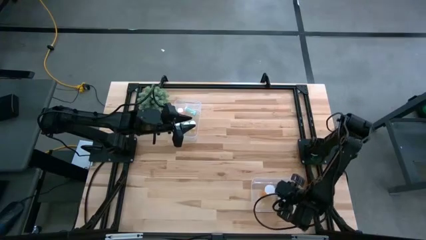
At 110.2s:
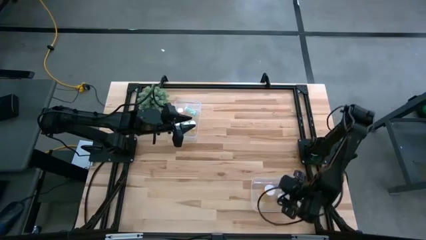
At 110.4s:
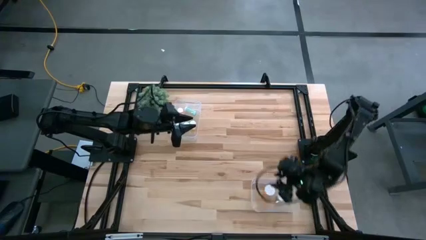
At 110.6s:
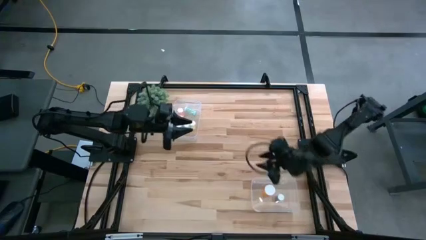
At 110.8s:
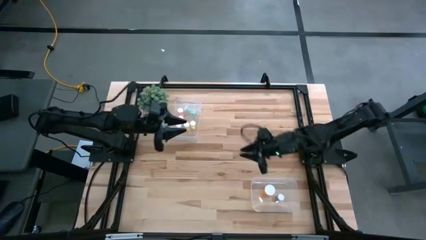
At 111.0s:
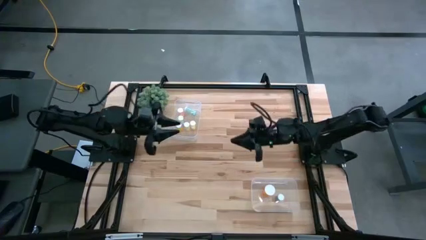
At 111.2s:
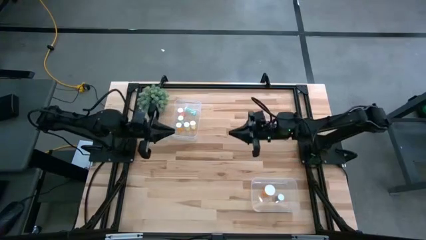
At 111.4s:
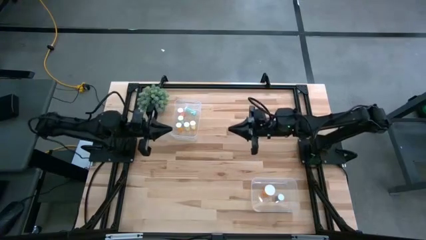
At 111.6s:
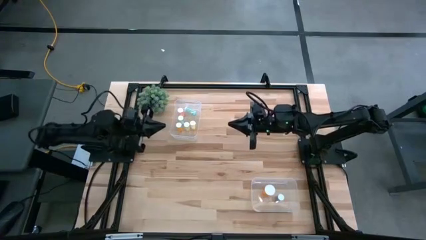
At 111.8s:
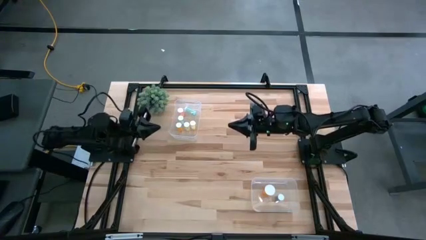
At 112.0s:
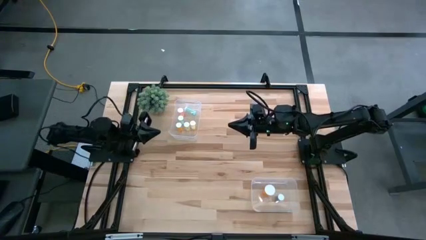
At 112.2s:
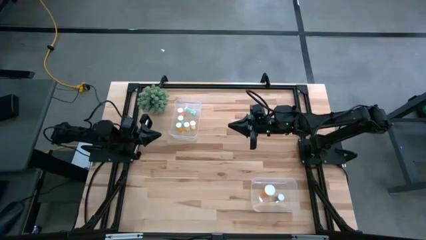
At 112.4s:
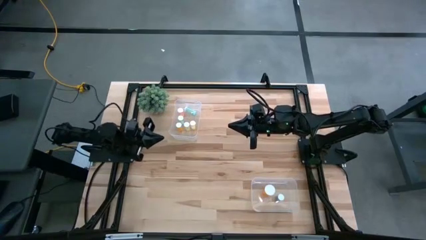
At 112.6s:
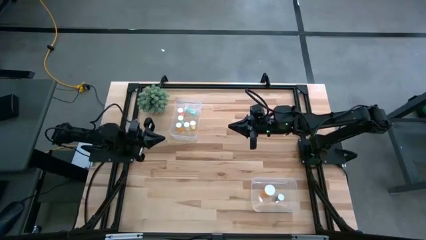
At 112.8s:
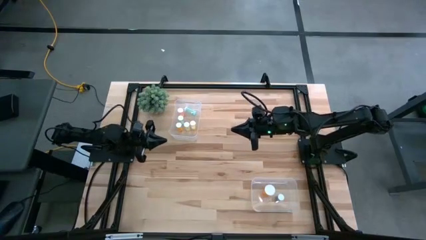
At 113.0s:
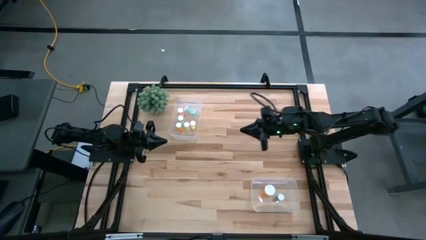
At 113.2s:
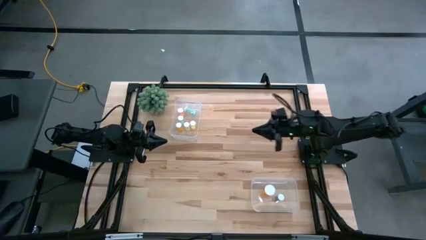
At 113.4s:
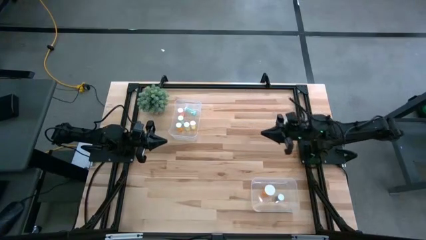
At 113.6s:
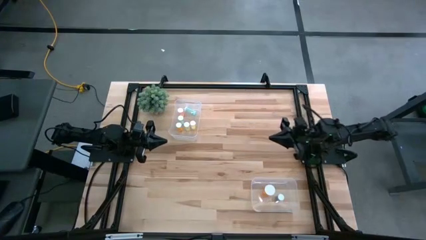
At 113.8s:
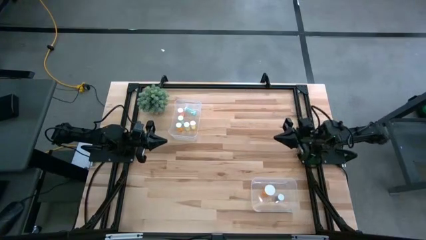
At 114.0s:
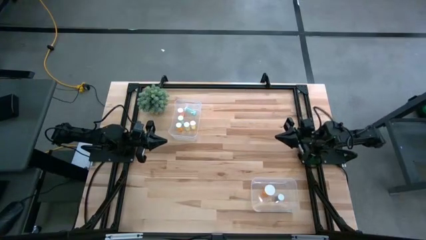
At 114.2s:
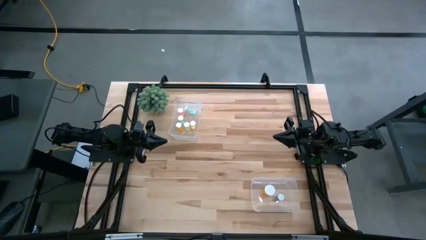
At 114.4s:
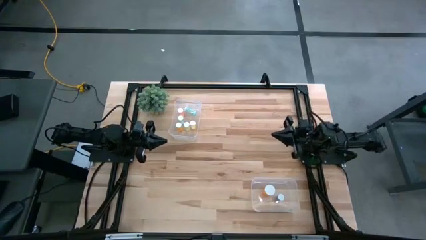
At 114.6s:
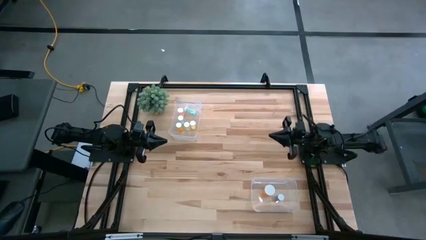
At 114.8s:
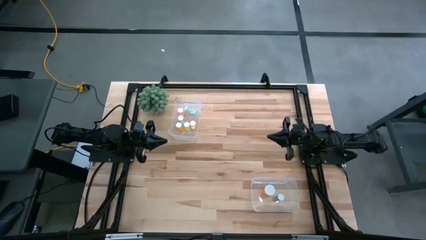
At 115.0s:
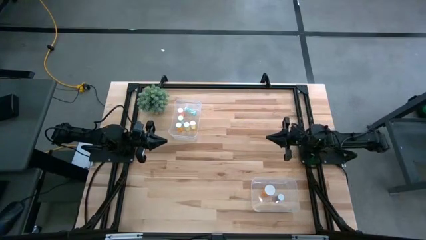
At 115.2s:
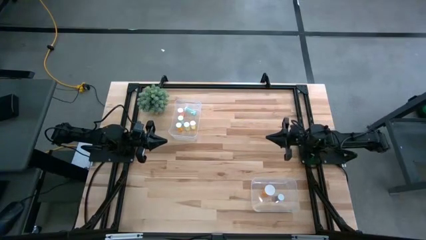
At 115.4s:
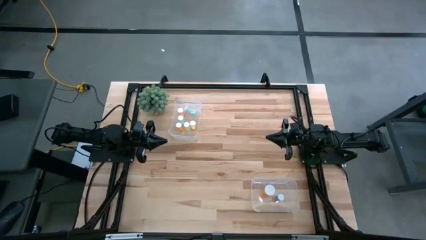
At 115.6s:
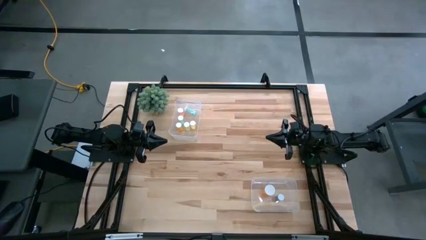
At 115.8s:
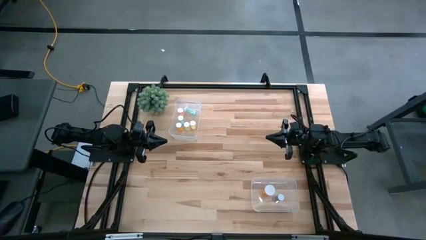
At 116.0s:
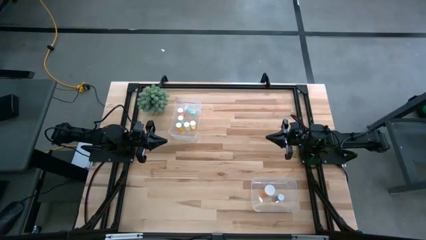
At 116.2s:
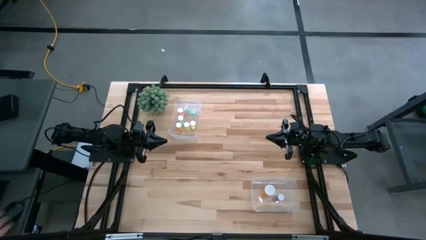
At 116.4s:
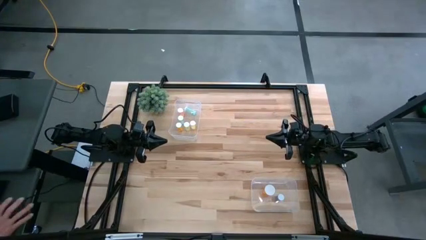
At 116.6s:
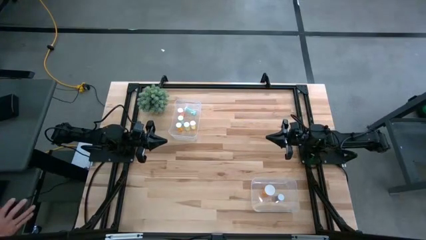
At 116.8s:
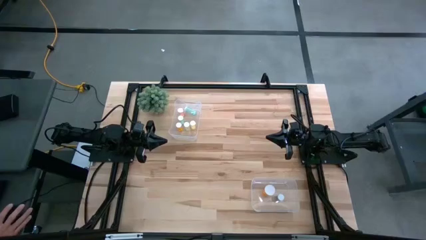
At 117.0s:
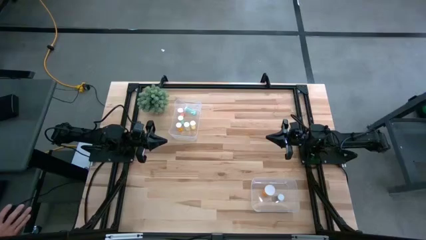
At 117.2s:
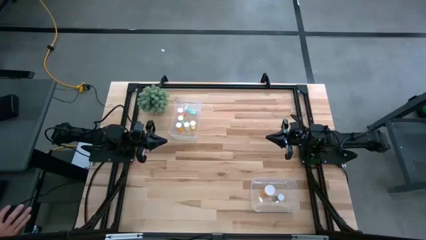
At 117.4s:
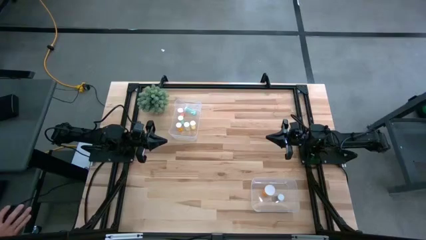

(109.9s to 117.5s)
Task: Pick and place medicine bottles into bin by pill shape (circle, oval)
Return to Home Position

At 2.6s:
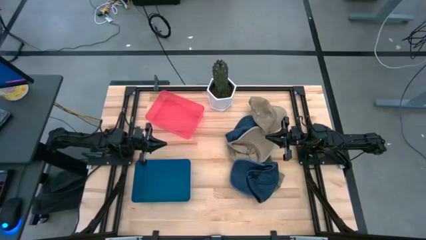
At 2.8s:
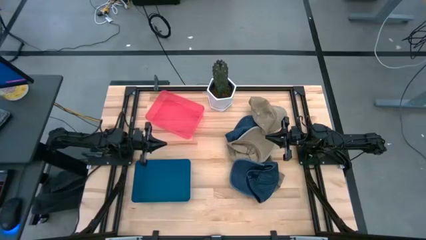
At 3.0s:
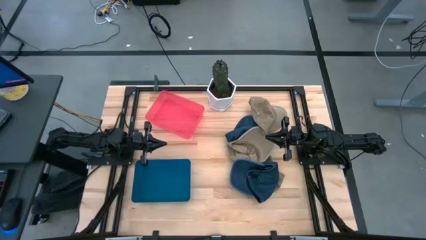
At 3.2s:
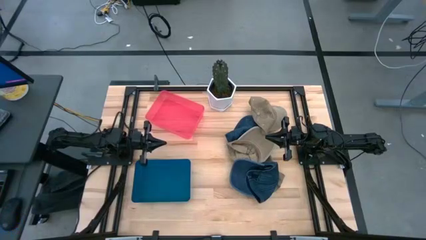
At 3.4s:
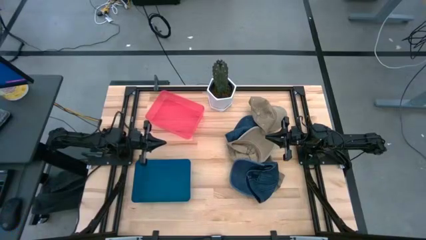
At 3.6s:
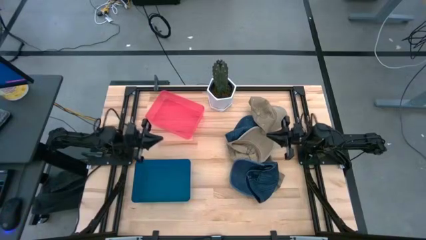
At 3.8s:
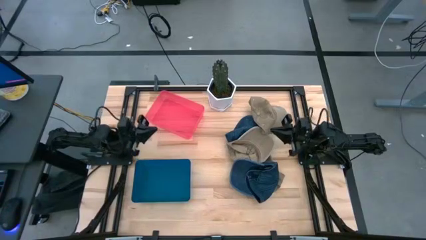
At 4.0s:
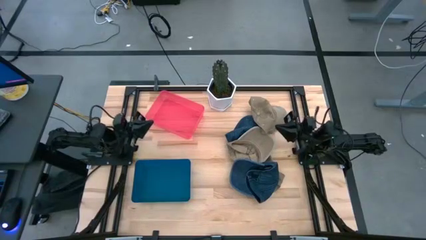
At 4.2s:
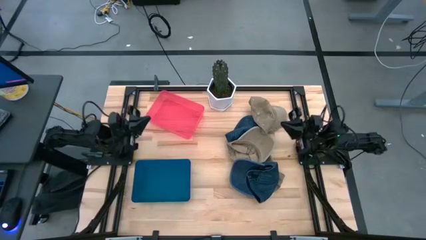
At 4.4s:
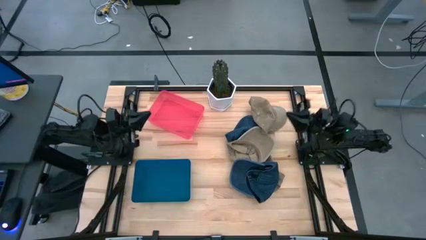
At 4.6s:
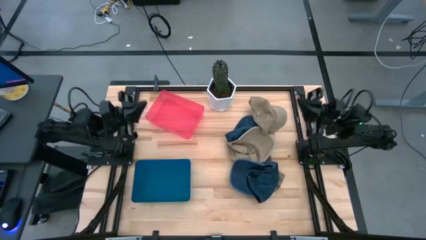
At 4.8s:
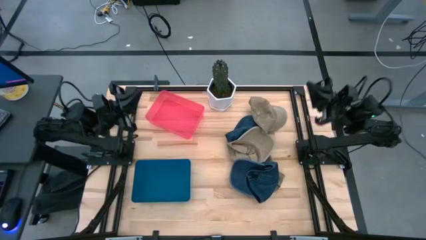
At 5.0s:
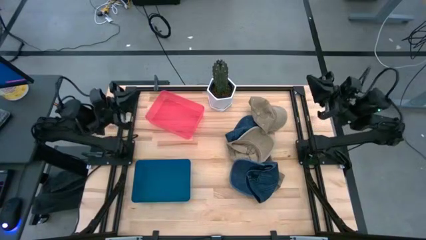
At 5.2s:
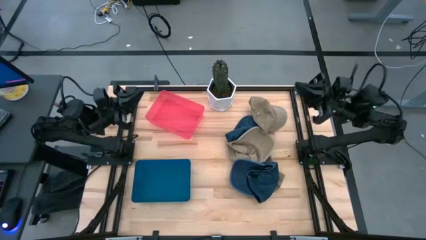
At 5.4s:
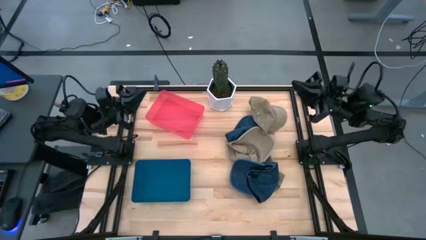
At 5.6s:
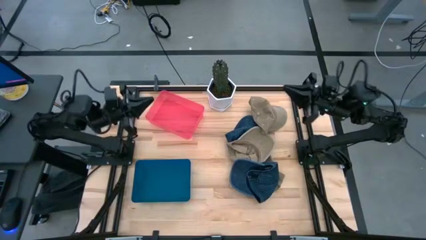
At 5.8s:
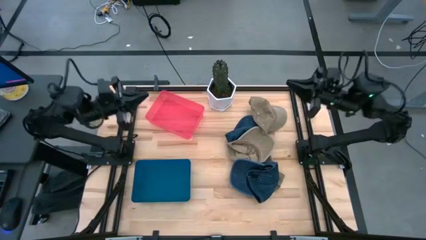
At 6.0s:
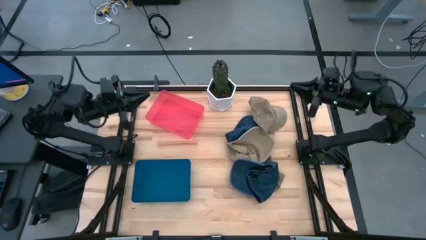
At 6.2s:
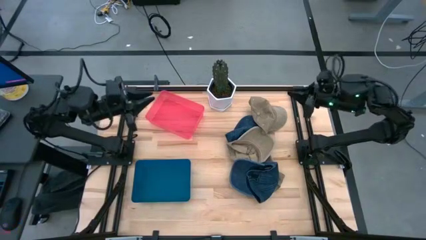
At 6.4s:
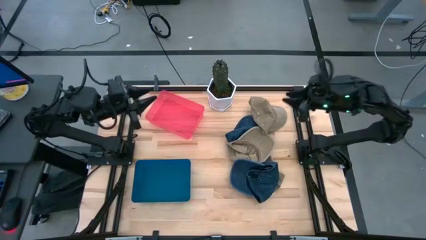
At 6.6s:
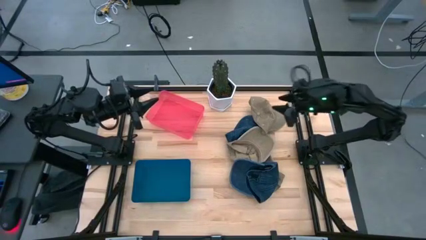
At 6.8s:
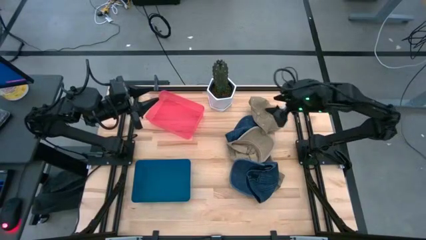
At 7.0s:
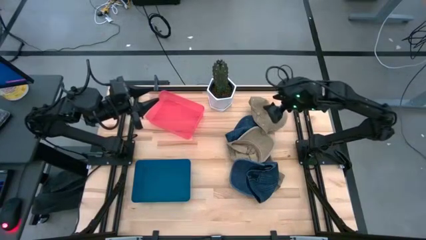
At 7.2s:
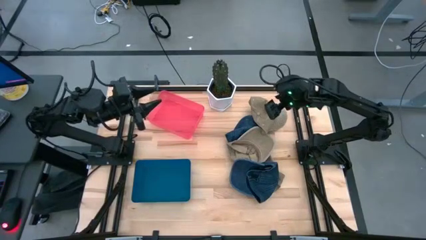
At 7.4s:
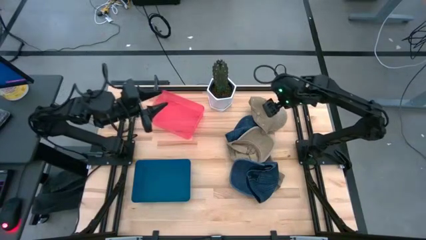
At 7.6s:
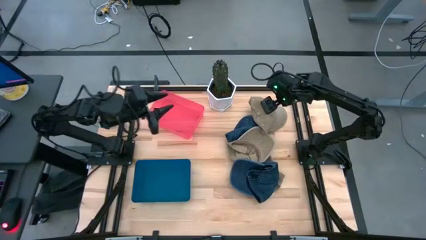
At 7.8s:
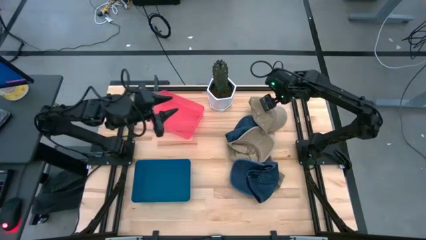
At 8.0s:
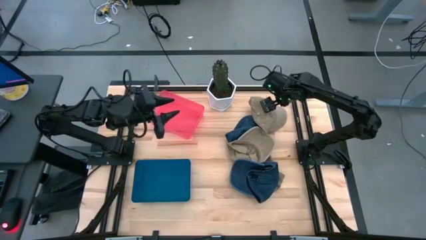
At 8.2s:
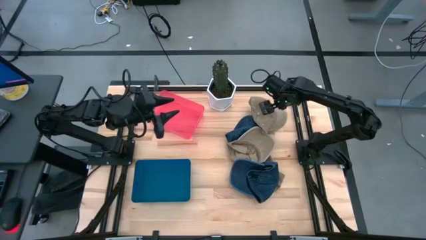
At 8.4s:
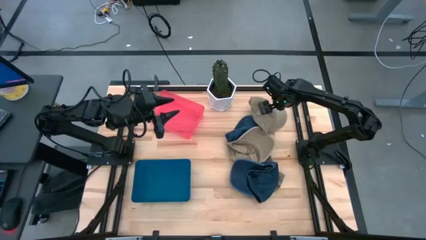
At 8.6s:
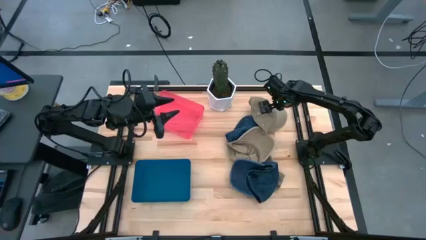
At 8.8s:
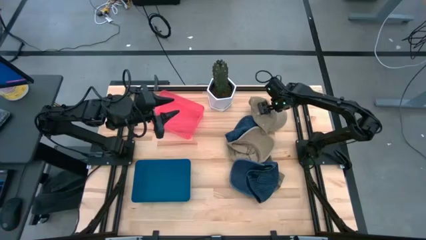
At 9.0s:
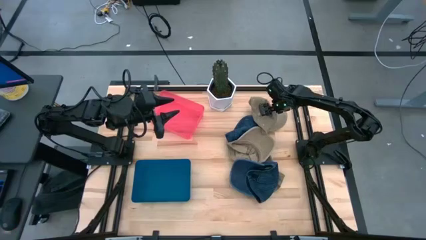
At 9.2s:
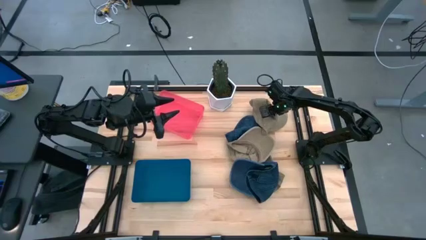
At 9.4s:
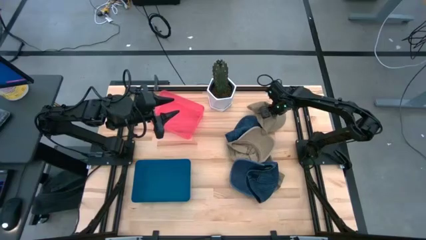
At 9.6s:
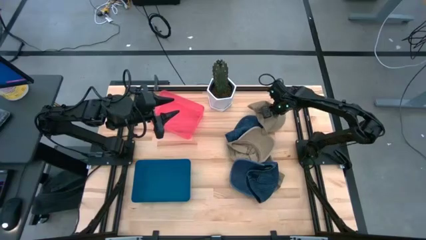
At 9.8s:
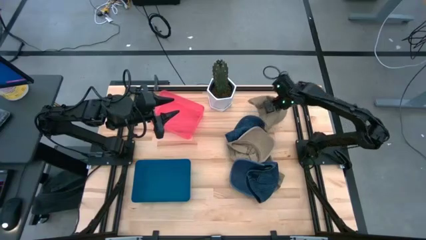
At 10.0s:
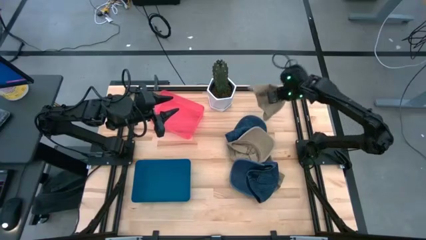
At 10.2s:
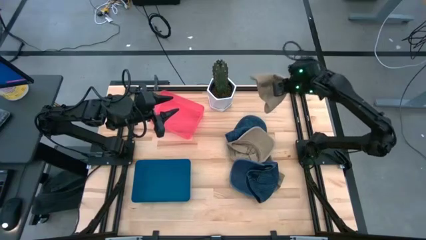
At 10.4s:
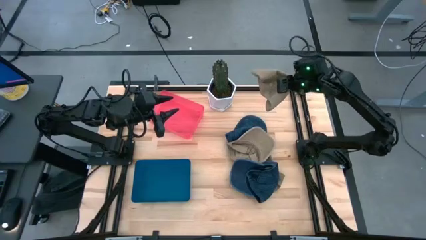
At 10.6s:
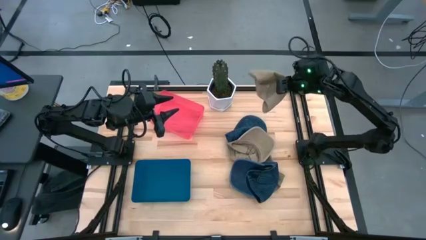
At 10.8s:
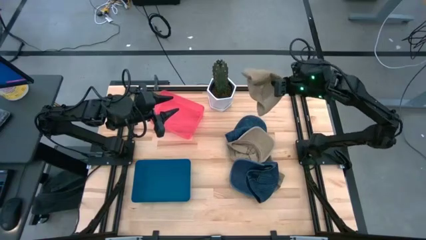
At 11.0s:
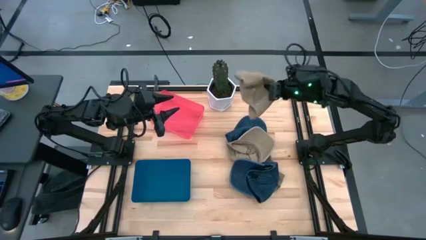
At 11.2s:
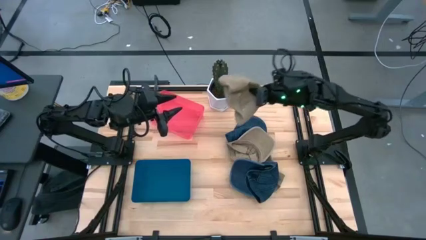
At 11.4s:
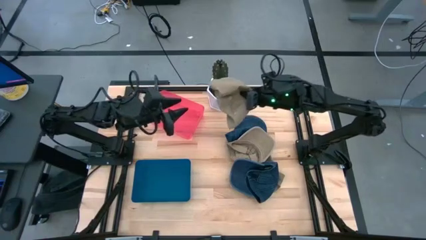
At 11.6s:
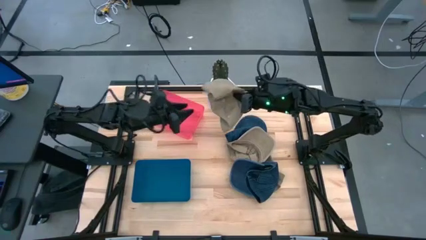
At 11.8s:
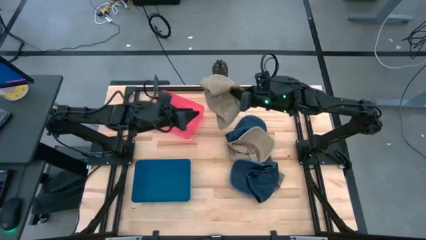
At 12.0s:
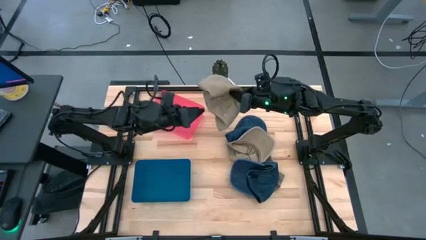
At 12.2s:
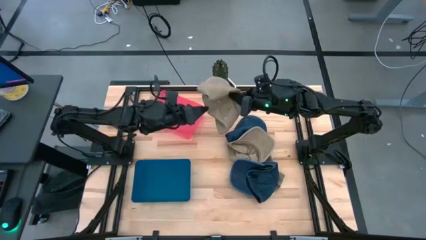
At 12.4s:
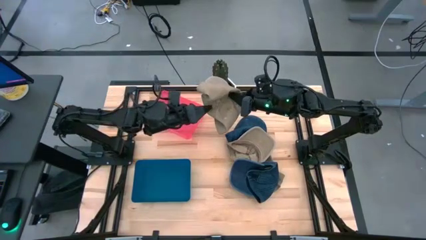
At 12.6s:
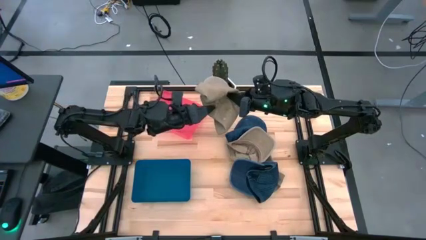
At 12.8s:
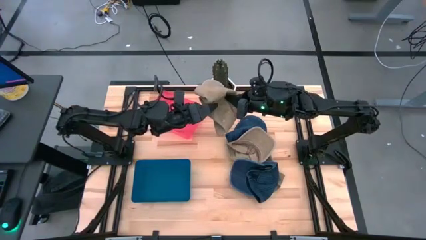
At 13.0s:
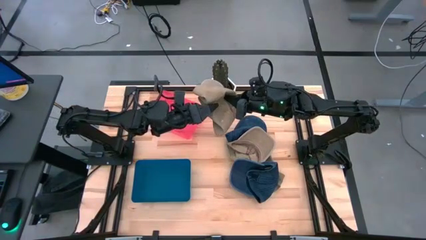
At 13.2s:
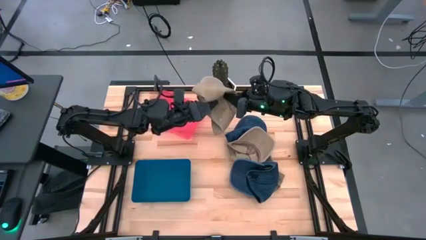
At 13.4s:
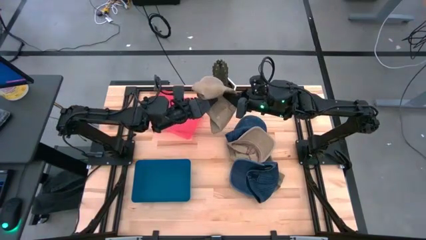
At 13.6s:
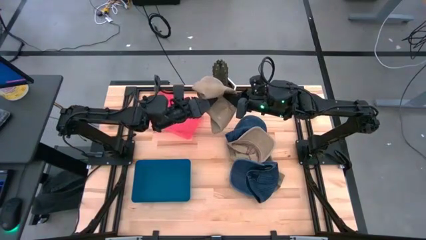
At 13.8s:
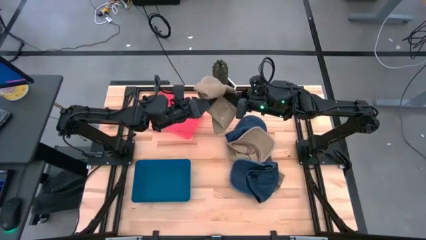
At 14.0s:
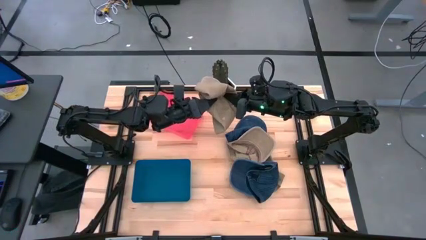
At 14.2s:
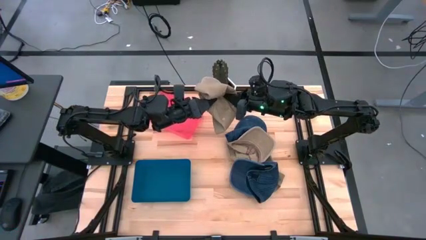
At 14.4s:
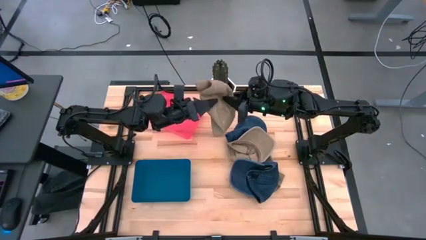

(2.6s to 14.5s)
Task: Pick & Place hat
Put the top brown cap into the blue bin
